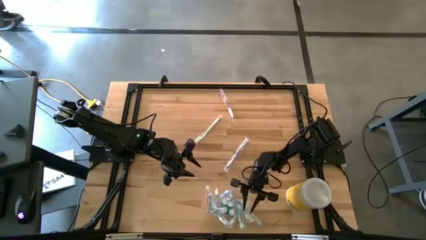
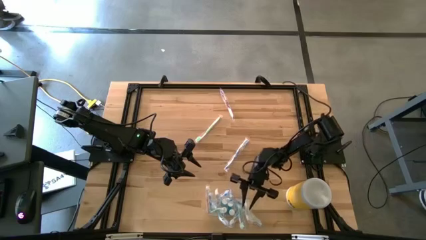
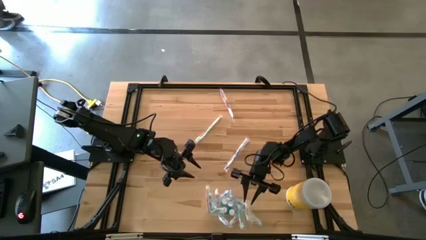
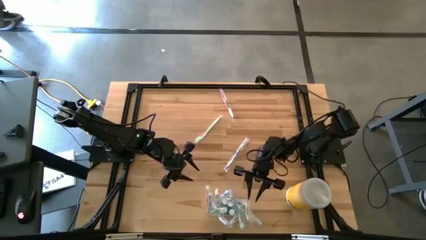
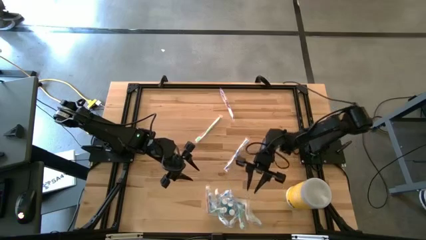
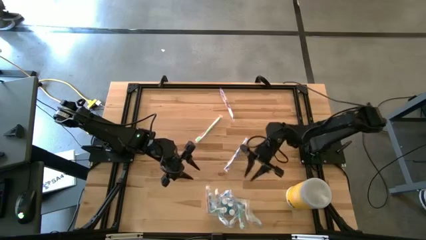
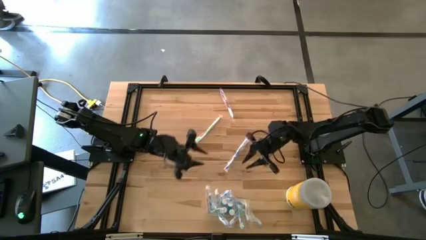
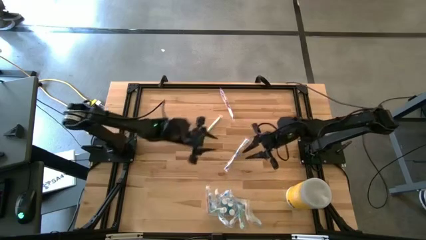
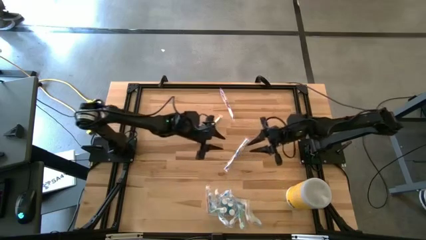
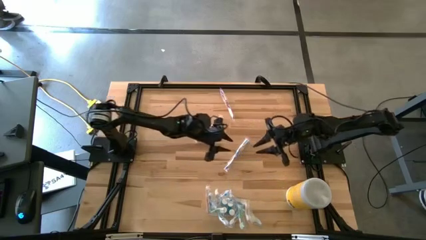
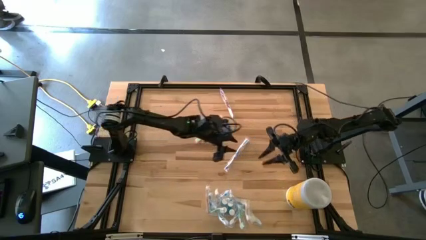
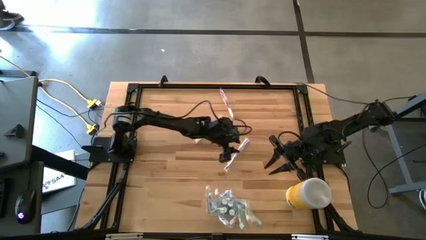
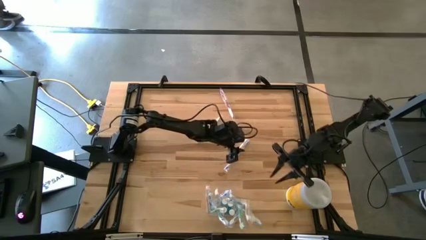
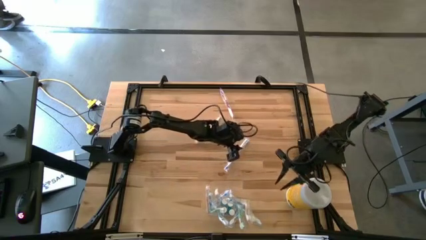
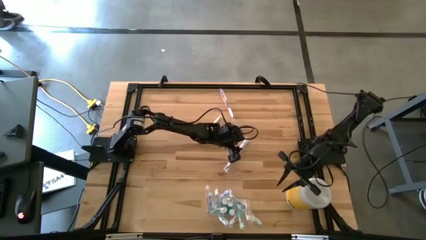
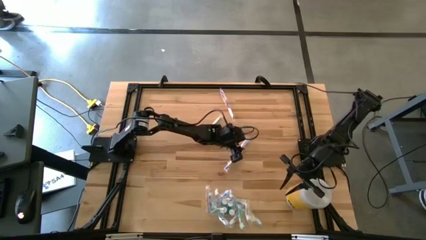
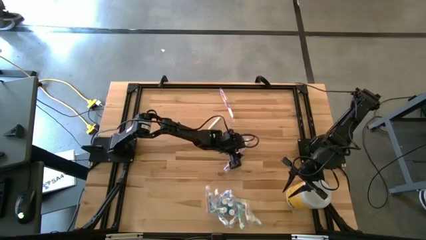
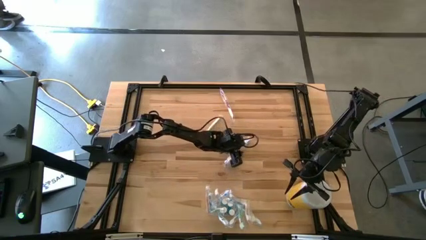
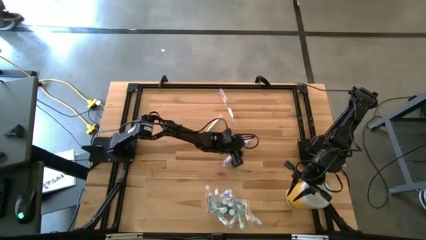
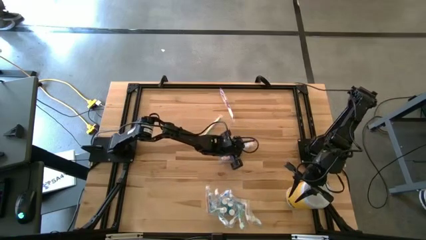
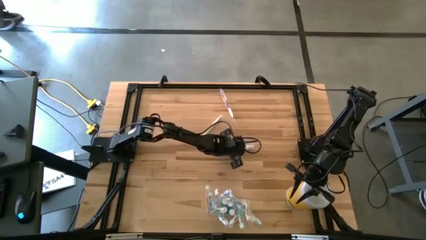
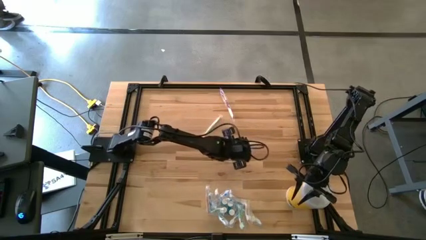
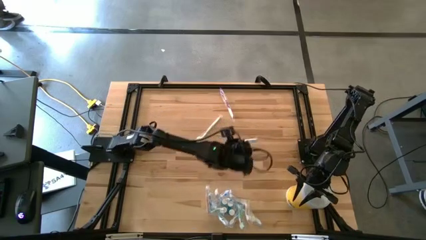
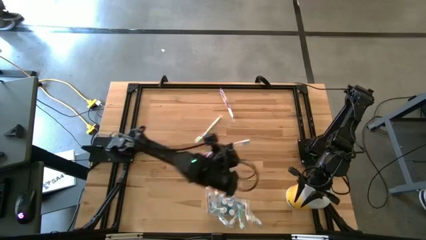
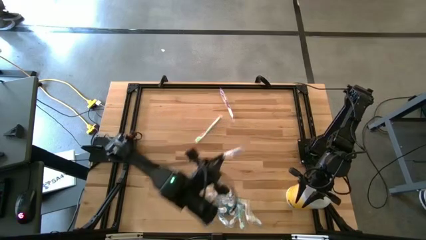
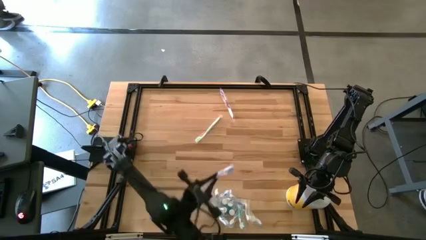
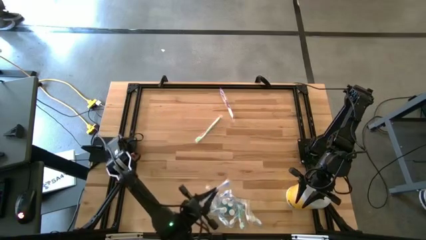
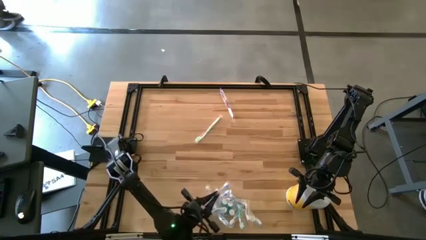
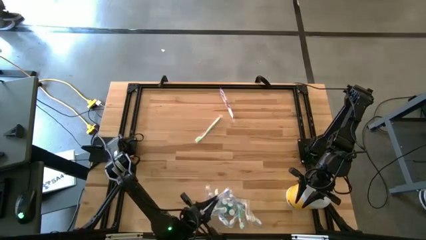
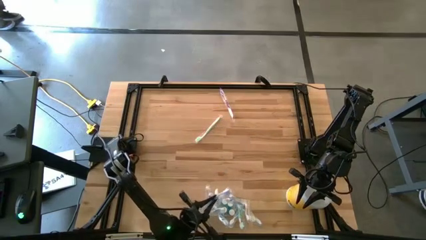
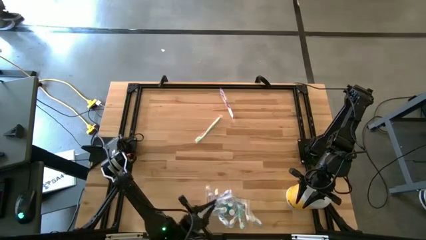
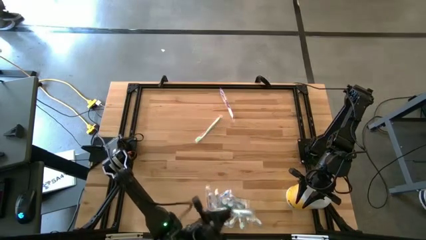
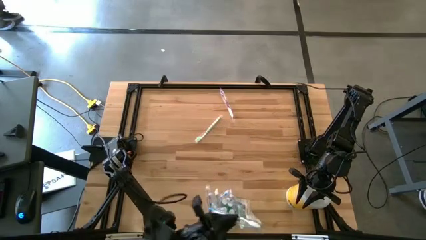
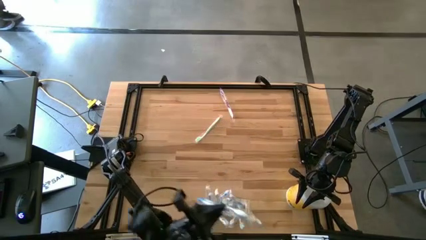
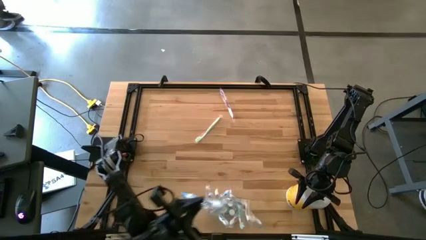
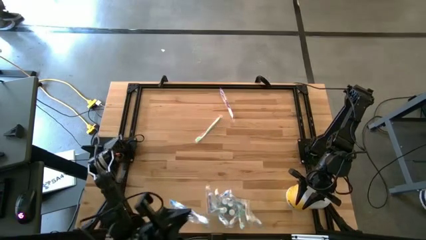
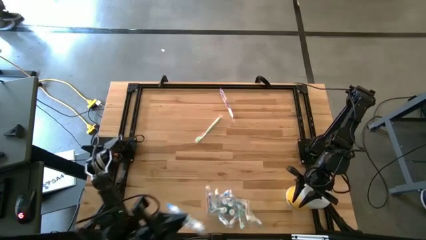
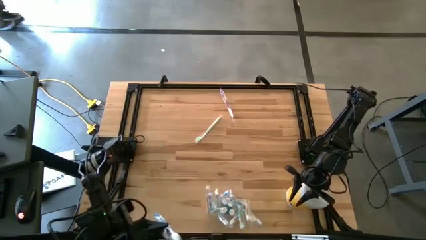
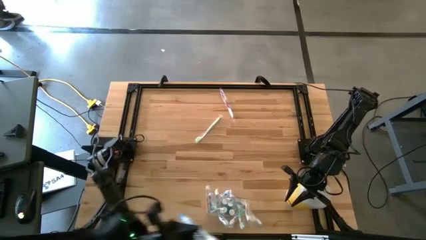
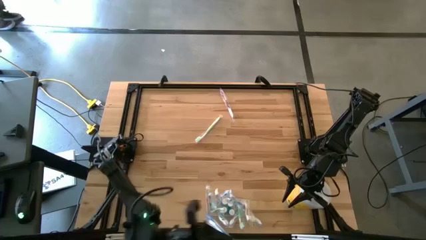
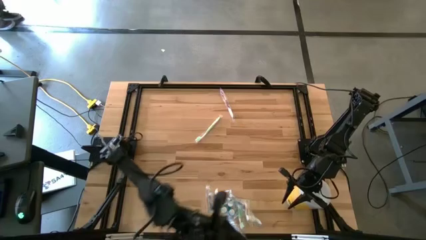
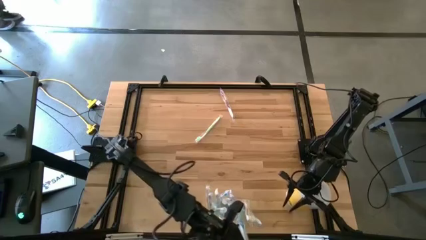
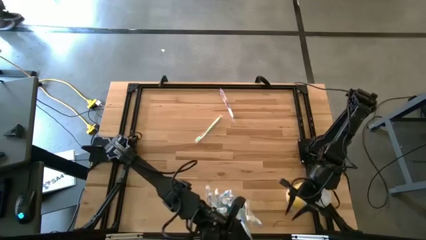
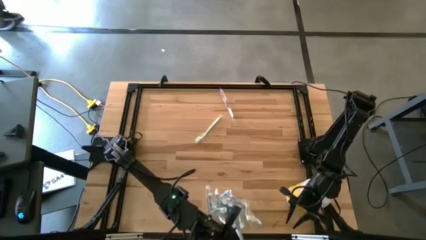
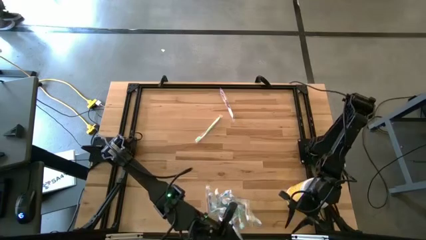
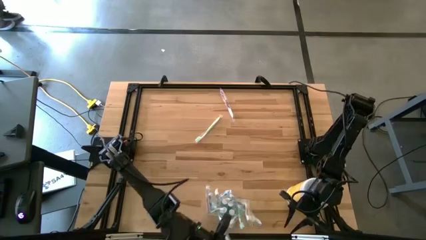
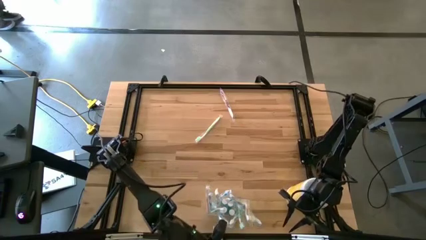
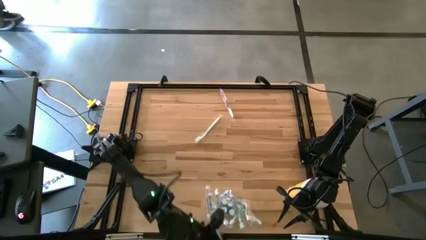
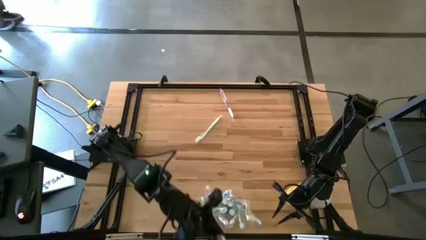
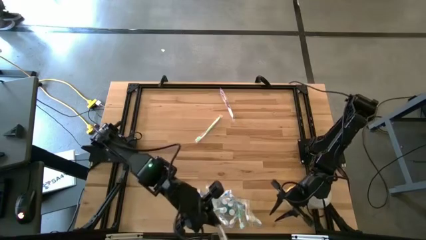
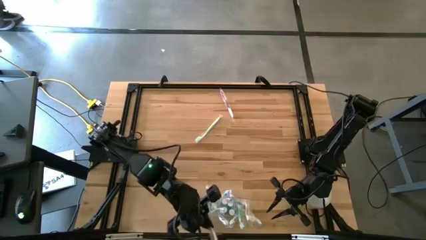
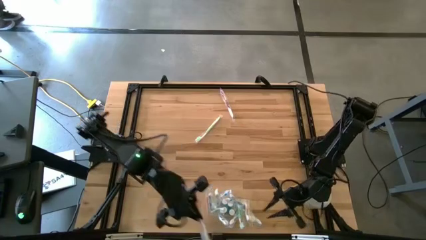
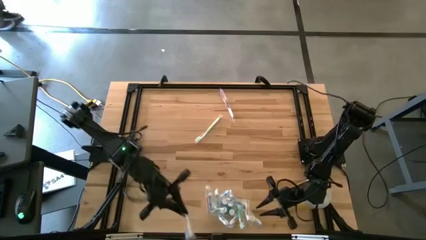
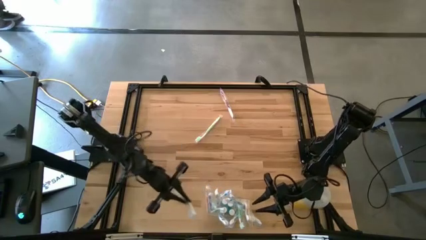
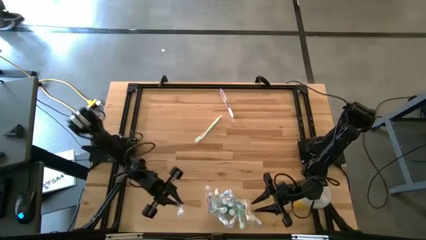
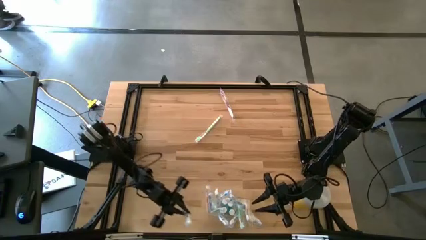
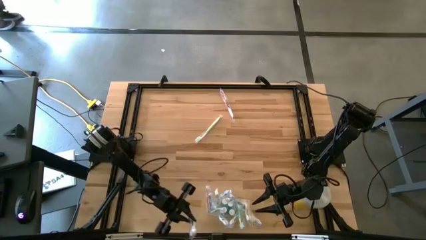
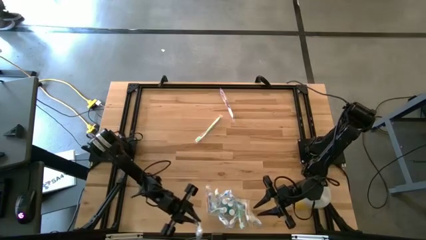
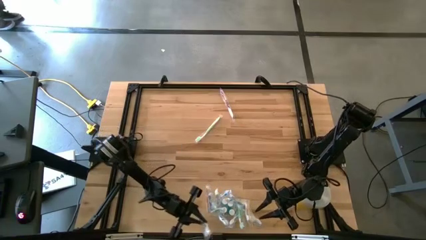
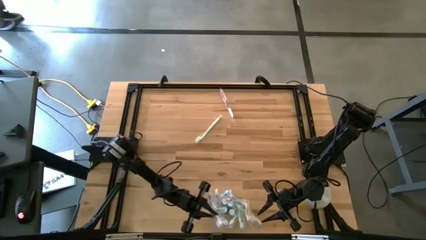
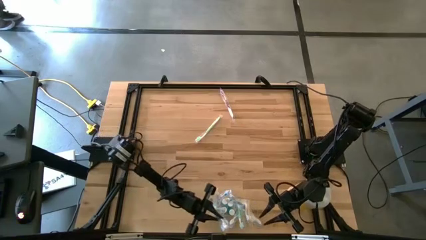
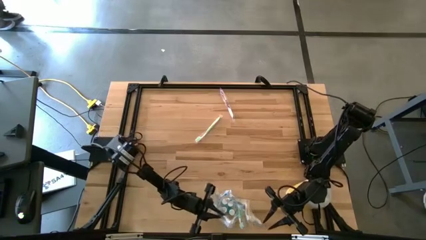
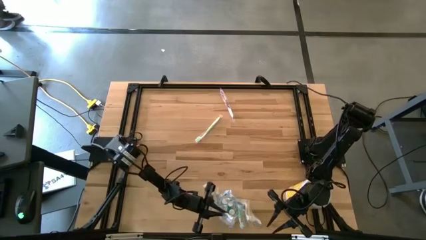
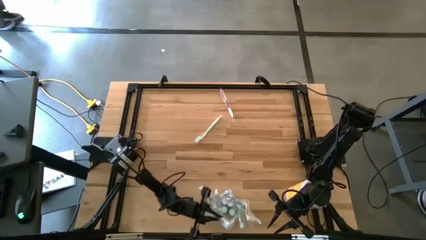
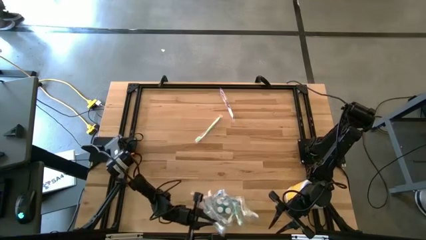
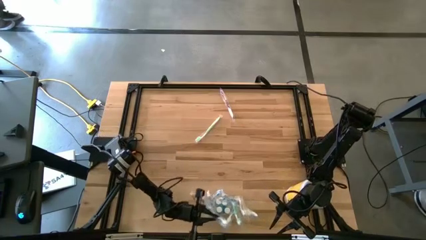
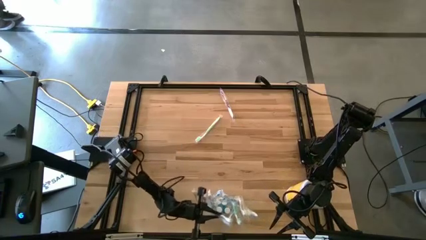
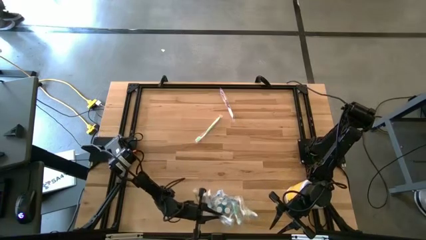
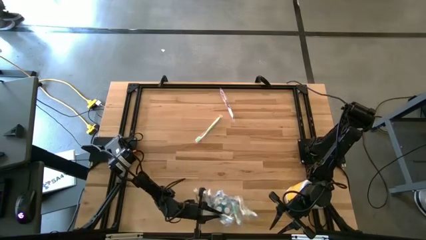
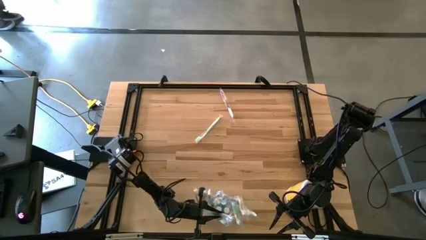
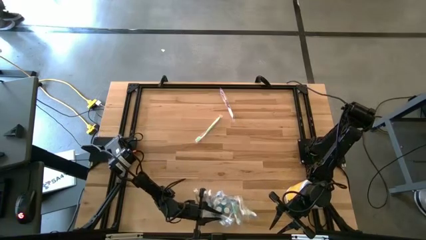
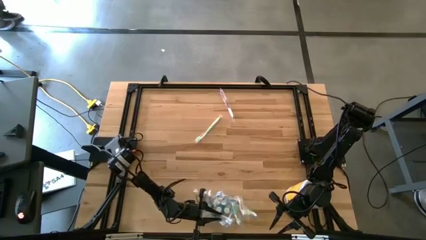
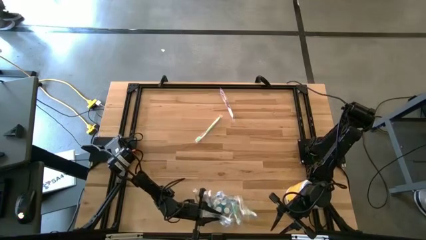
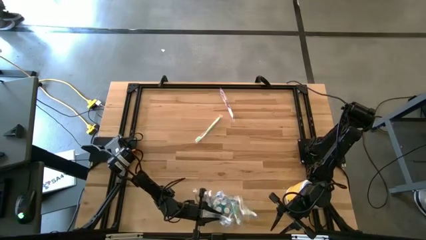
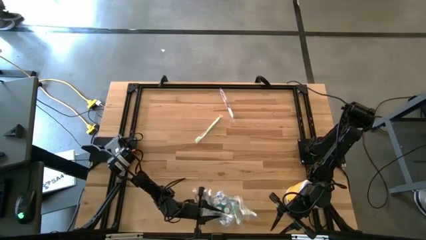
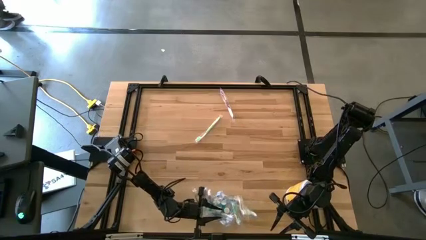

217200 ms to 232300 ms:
Task: Pick & Place toothbrushing station
Put the blue toothbrush into the transparent organizer

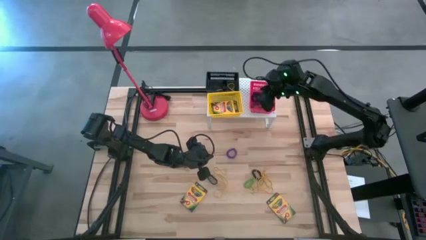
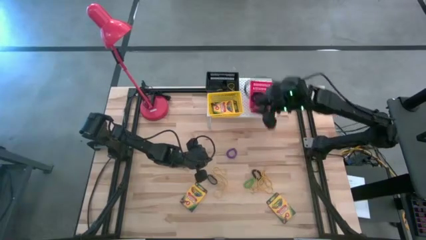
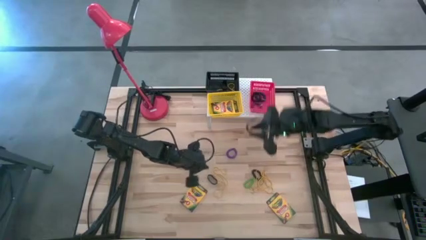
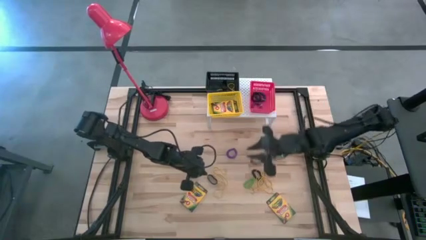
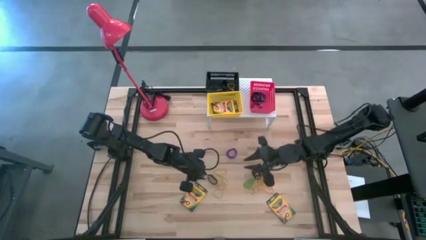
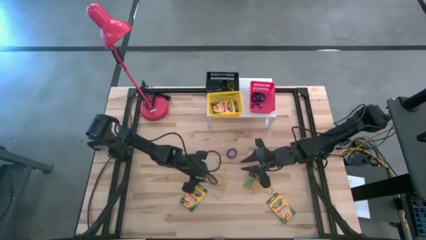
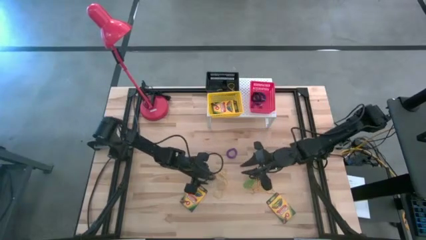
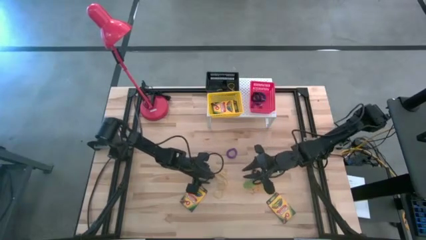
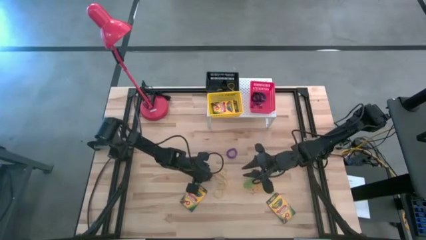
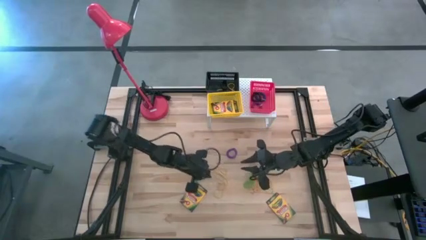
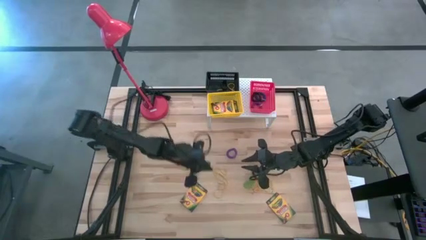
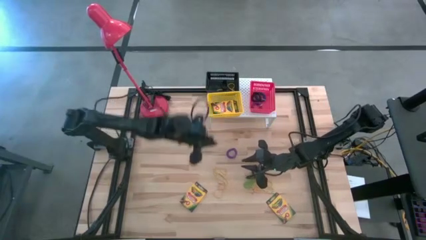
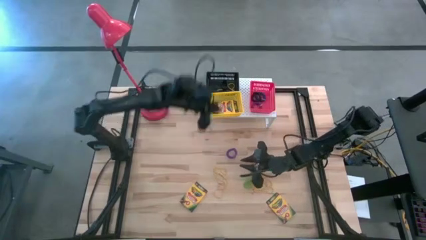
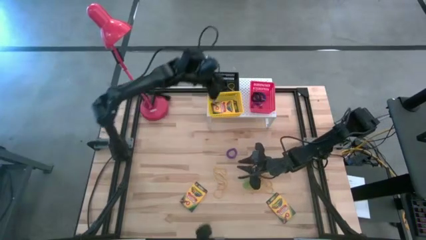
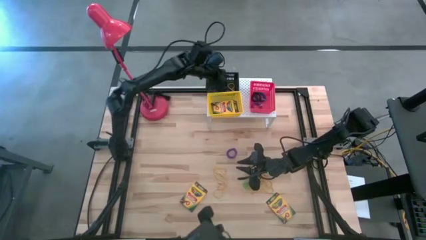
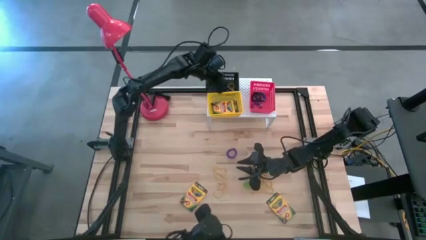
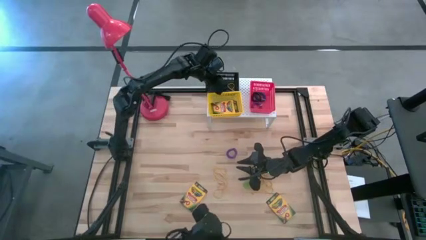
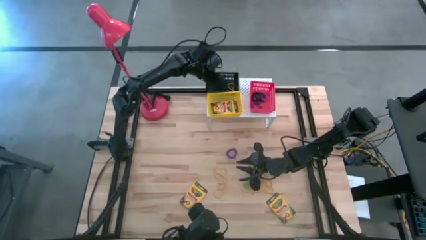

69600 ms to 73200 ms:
Task: Pick & Place Office Desk Supplies
Put the black rubber band into the black bin on the shelf
